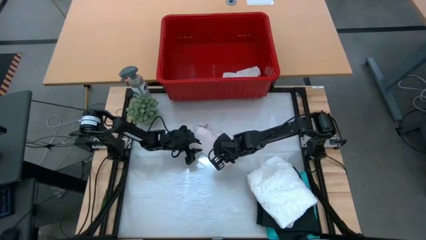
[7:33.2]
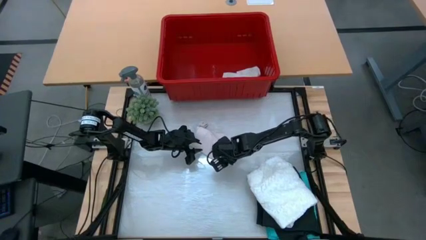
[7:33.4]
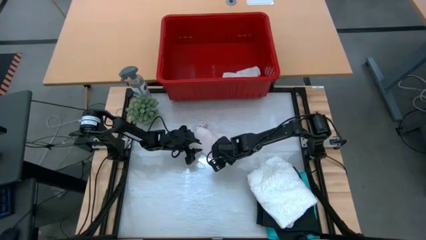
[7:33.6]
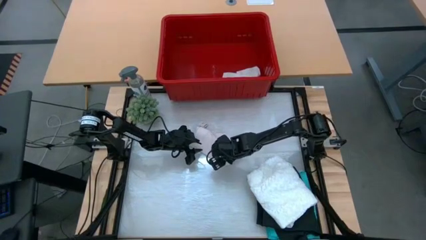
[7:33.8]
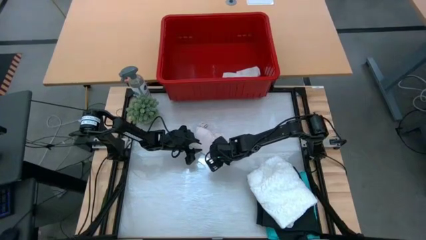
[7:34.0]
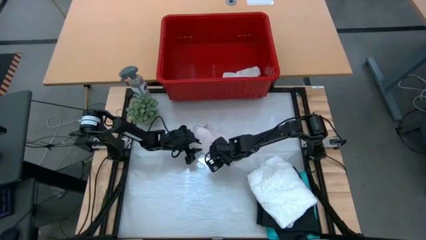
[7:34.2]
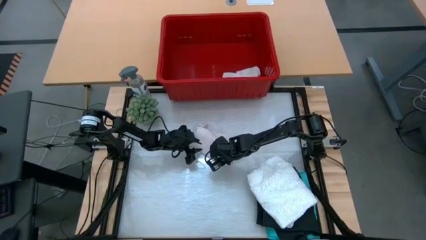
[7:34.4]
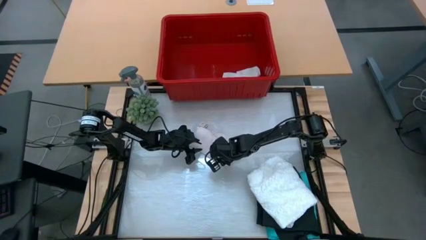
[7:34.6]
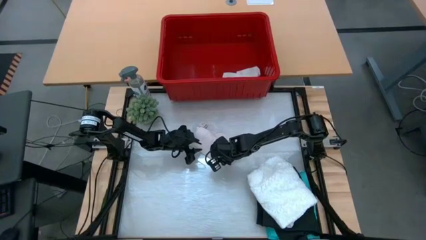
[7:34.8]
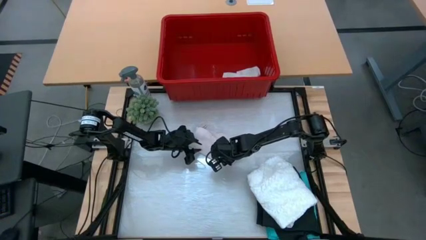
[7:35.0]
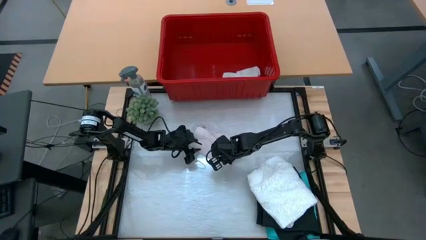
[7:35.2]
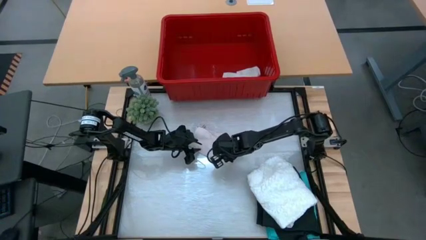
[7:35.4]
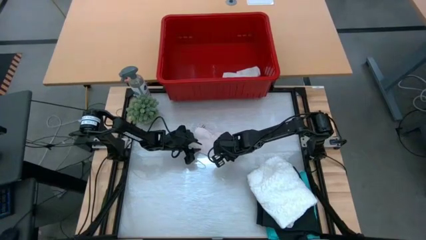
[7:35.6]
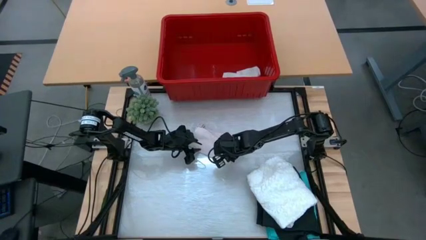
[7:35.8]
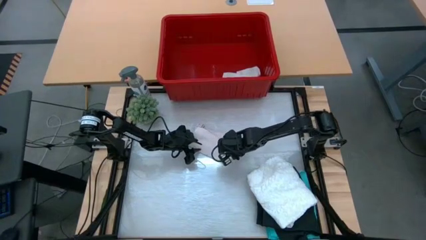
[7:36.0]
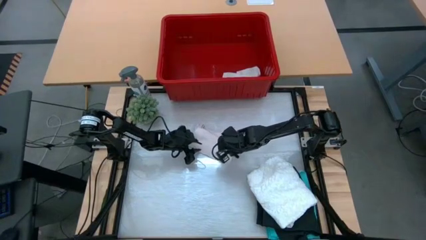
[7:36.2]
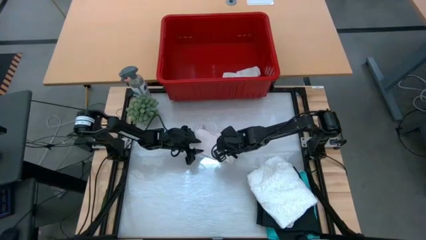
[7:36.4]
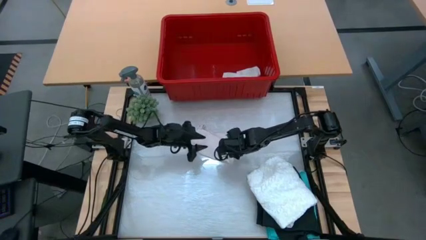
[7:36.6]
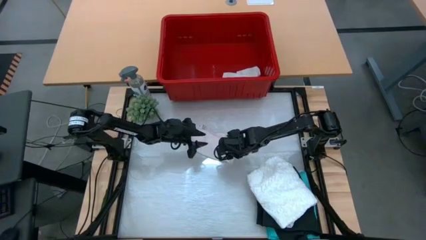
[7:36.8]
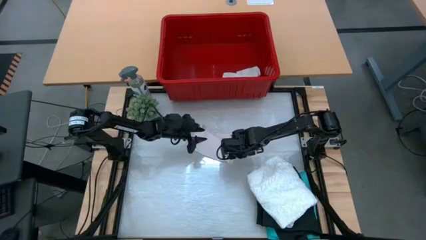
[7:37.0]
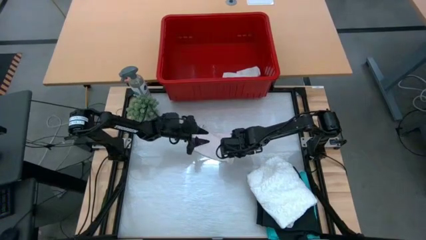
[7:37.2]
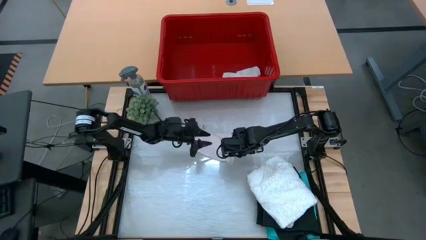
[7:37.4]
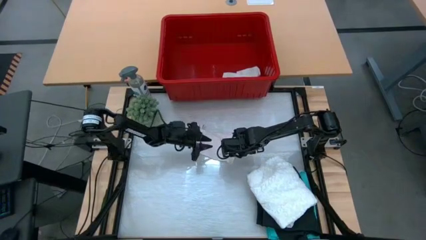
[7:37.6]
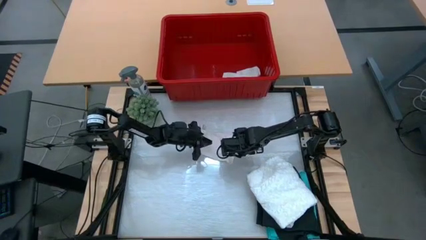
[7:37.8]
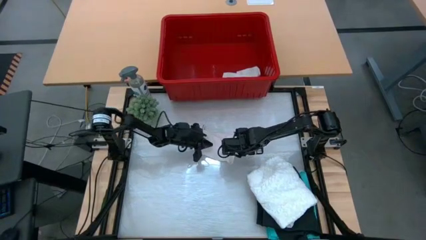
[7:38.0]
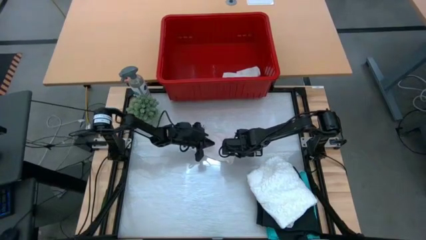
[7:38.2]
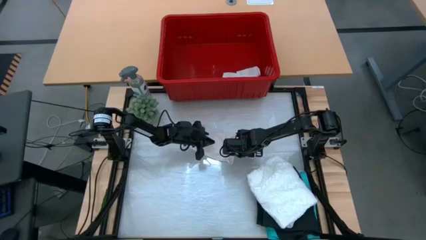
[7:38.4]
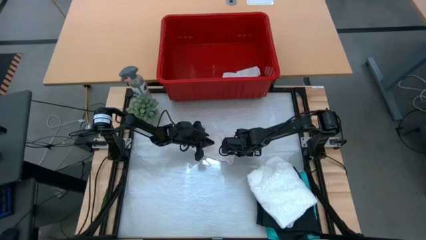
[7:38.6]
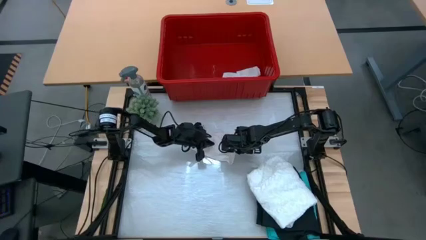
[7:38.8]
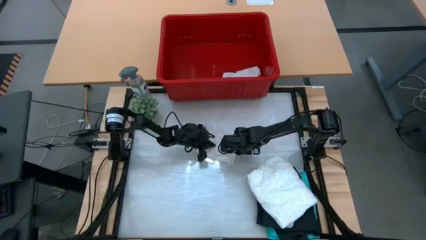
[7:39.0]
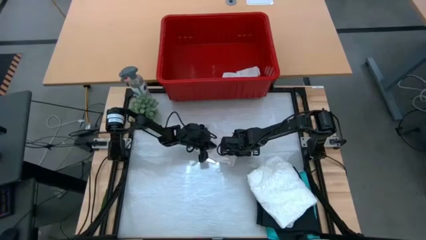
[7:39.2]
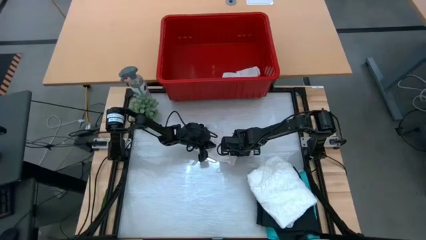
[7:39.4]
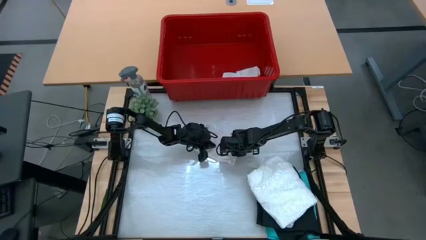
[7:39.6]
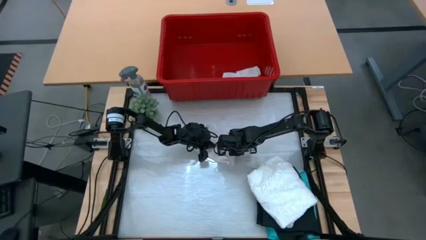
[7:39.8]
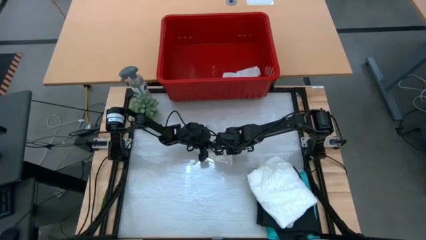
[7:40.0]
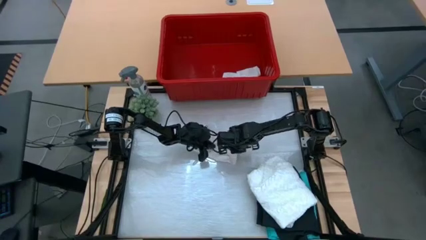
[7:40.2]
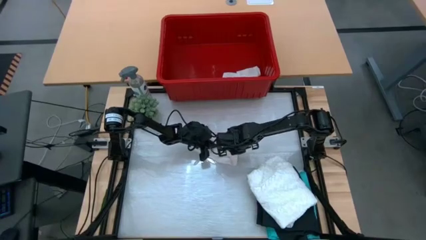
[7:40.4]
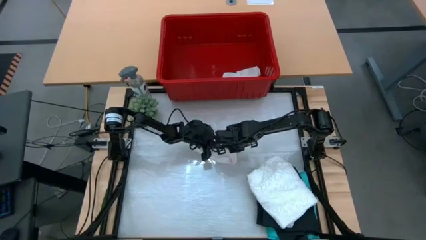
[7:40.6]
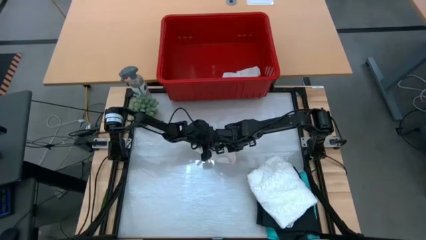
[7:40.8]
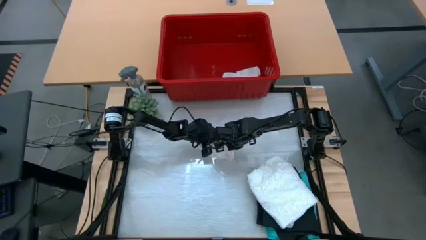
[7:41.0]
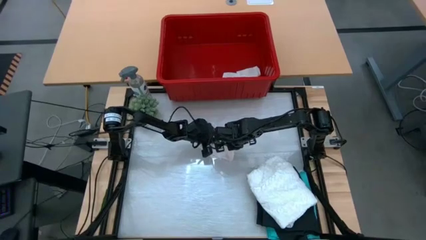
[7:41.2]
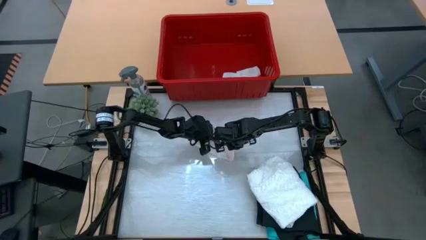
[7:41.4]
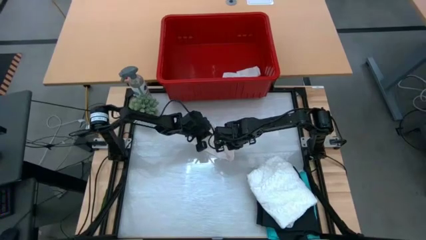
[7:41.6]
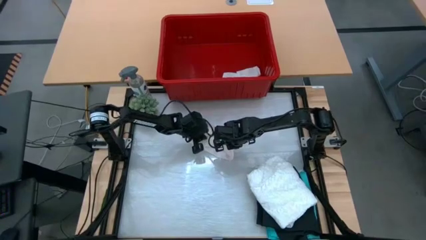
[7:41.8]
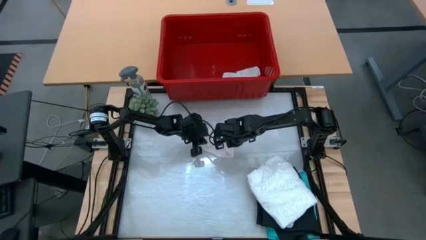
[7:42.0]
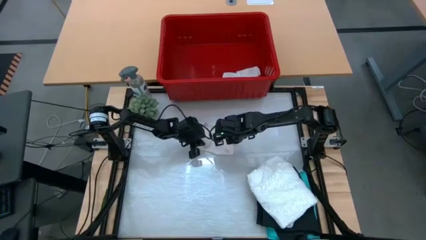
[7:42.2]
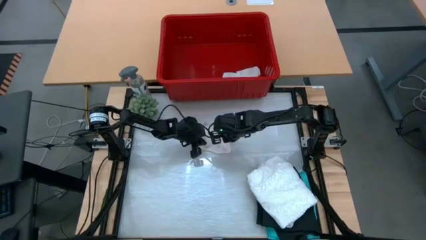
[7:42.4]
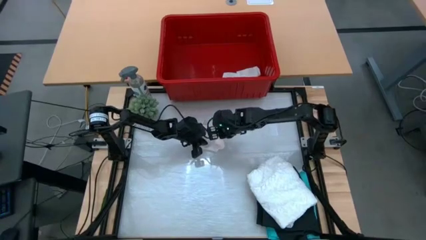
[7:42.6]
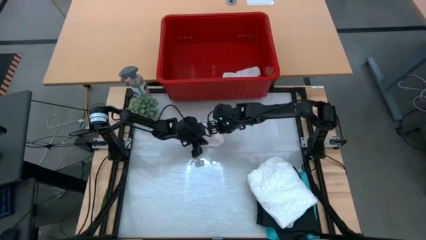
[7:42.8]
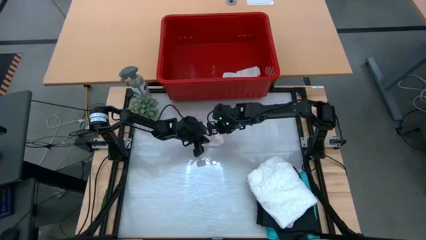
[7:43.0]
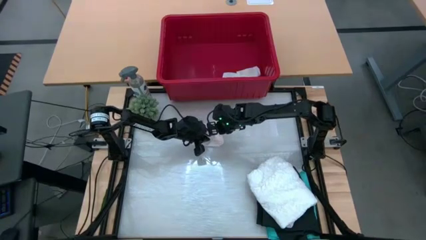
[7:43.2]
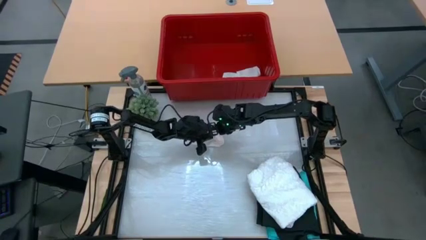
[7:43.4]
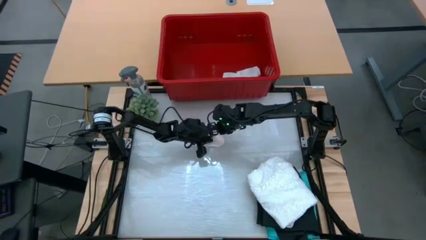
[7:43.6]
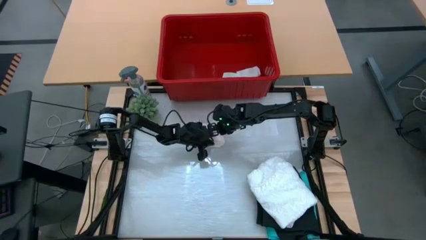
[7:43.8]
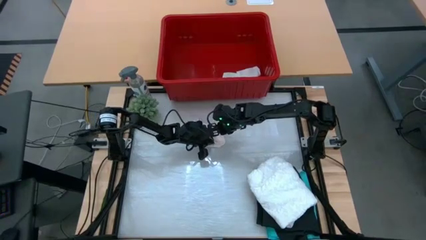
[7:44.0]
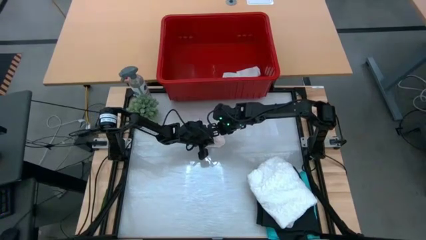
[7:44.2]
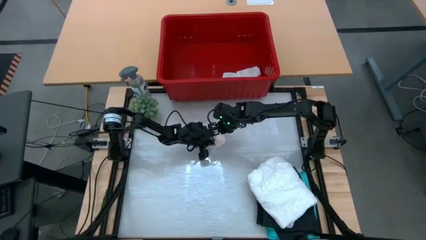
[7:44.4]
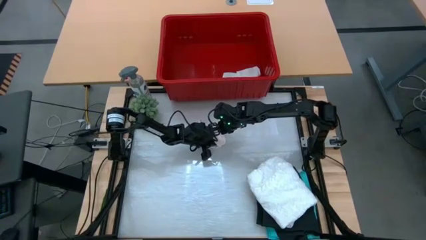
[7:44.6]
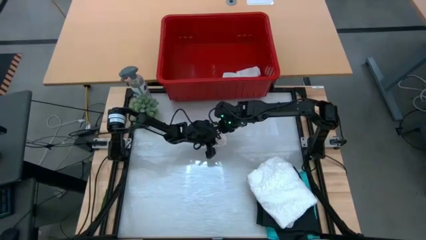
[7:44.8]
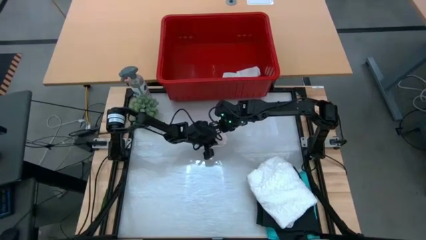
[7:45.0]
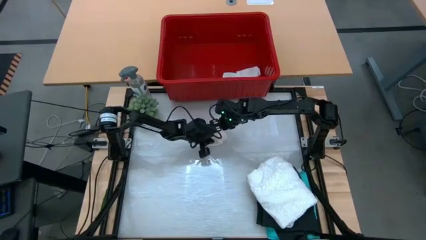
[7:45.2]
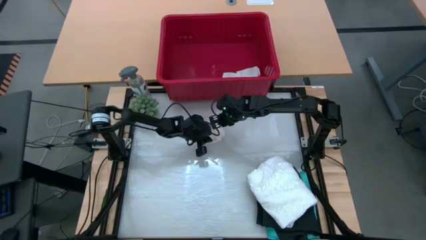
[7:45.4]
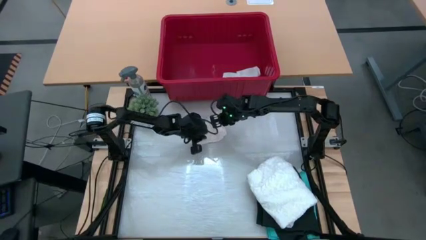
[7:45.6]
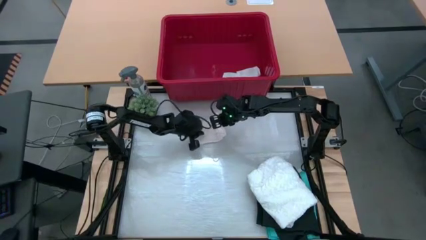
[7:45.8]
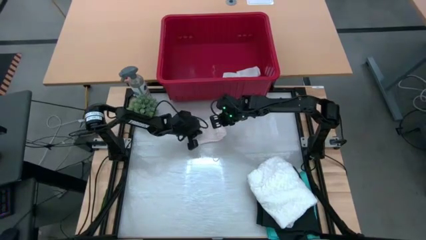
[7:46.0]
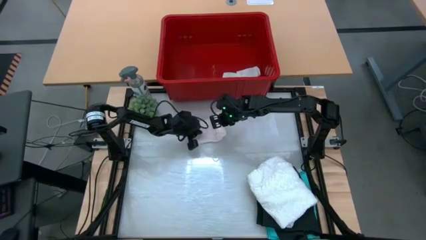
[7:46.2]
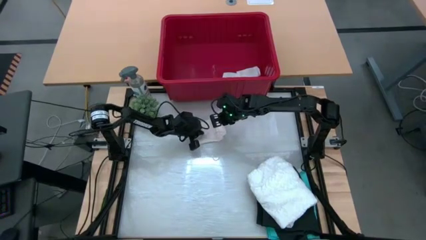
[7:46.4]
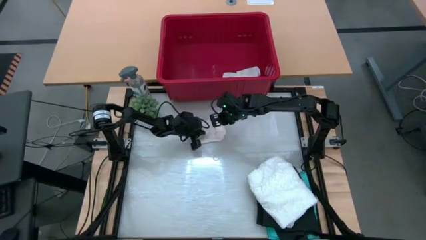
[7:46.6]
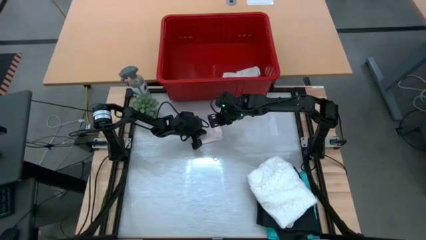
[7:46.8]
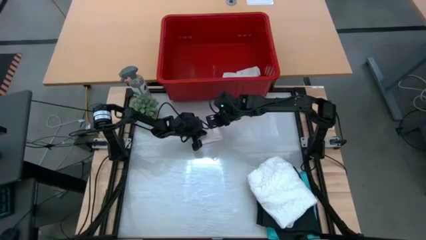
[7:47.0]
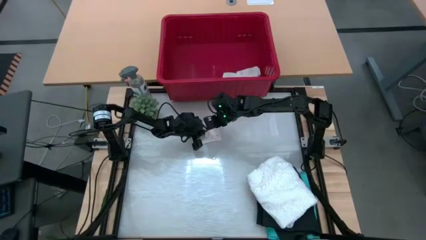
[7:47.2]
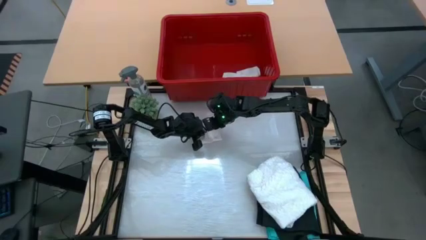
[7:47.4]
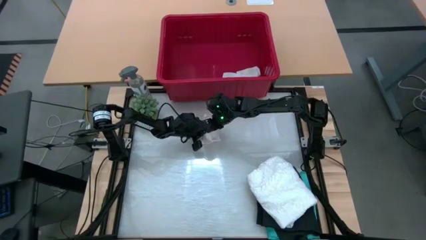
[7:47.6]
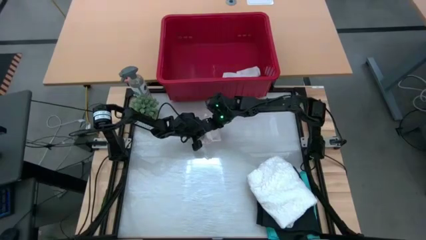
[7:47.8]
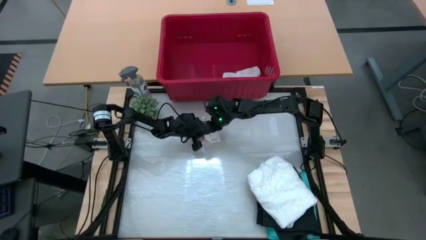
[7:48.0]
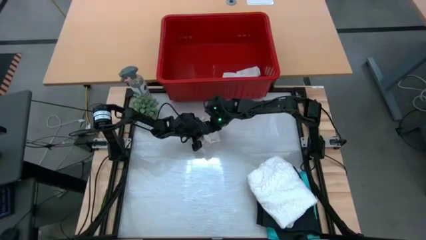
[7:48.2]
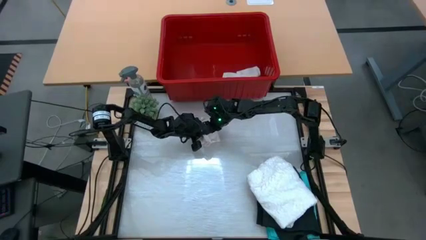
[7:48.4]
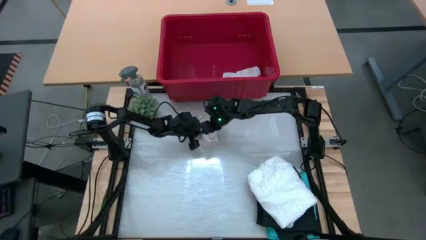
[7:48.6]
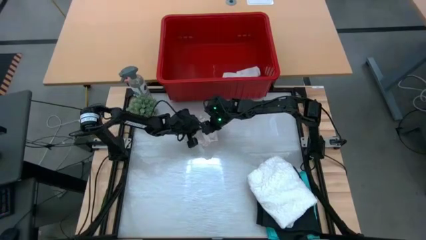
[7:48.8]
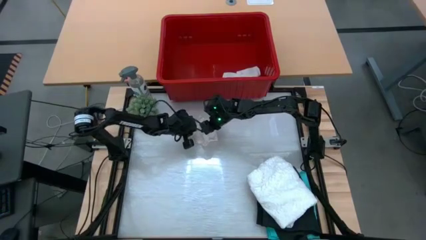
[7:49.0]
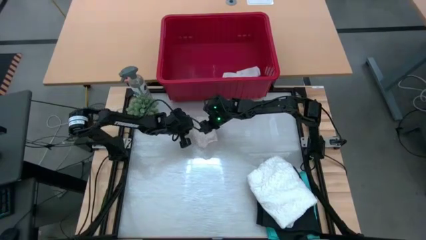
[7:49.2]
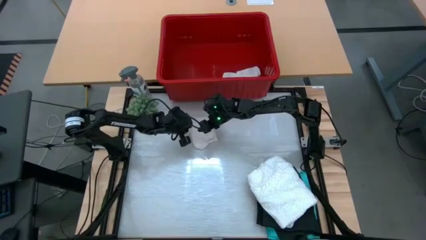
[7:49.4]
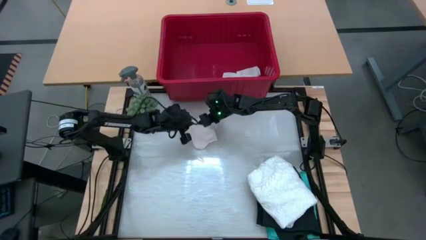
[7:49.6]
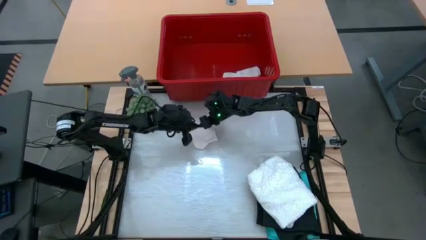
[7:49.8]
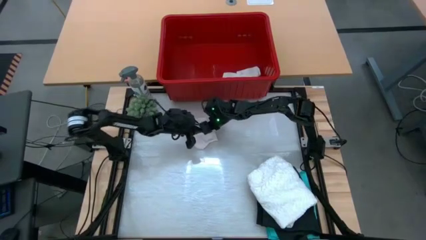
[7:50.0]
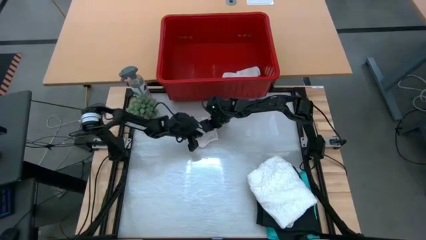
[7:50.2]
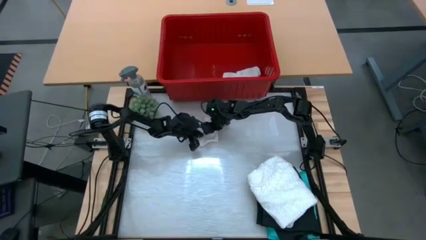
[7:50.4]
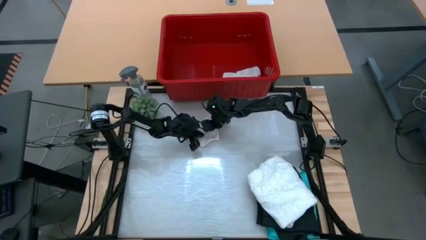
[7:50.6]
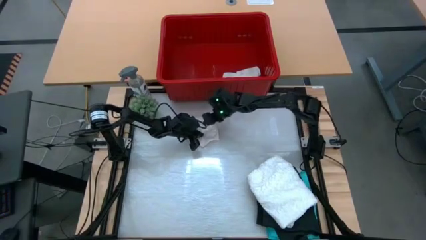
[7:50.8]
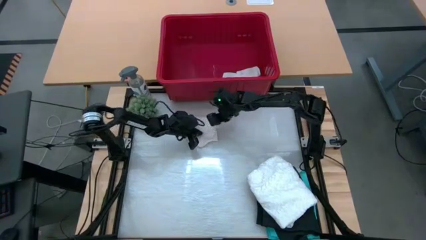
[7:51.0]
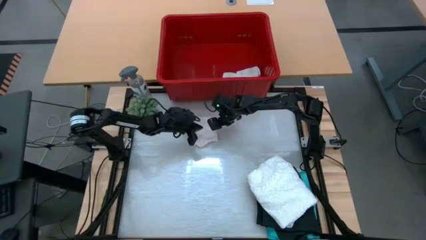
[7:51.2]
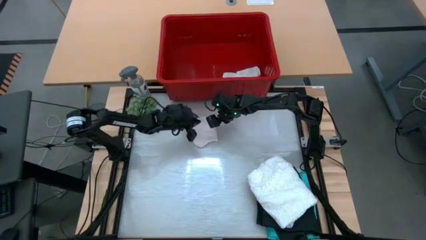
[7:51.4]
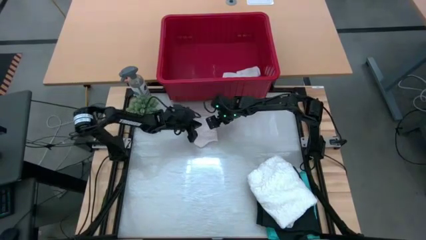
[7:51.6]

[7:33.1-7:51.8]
Task: Fold Laundry from Bin
Fold the white underwear
